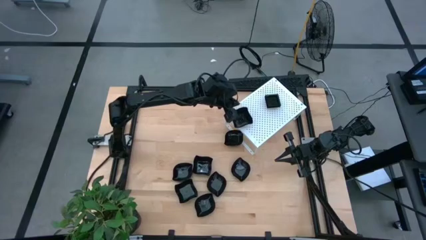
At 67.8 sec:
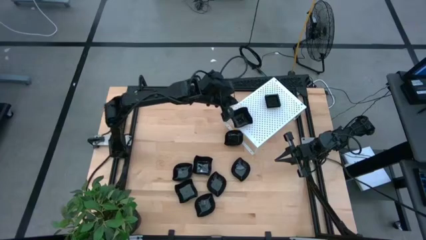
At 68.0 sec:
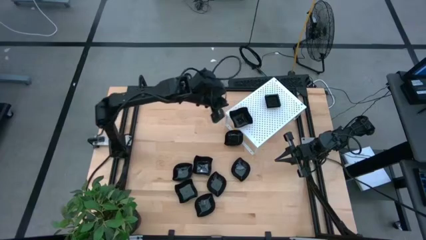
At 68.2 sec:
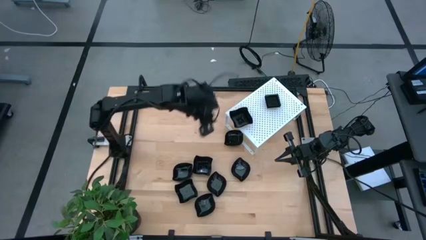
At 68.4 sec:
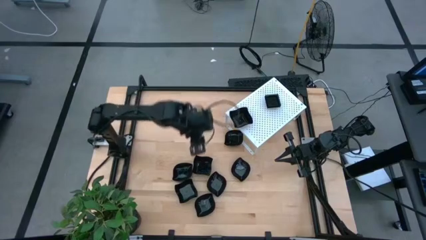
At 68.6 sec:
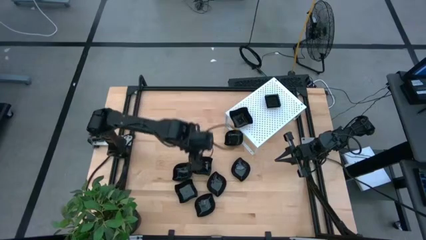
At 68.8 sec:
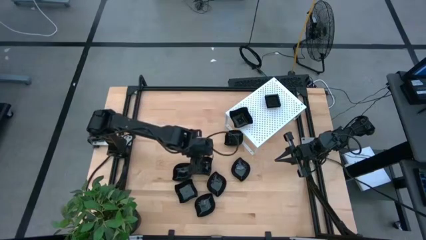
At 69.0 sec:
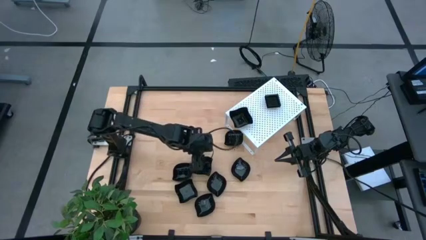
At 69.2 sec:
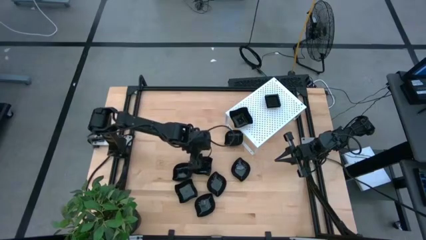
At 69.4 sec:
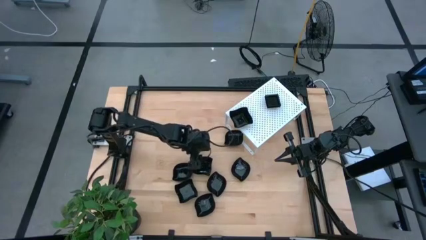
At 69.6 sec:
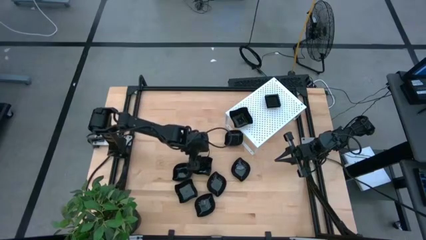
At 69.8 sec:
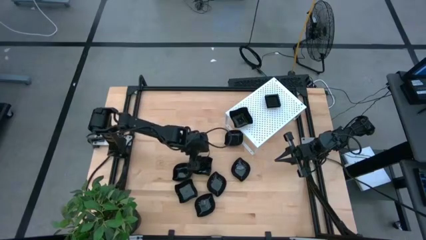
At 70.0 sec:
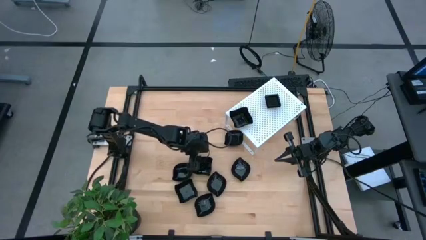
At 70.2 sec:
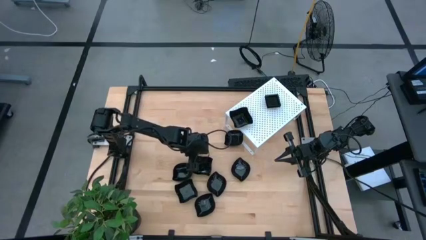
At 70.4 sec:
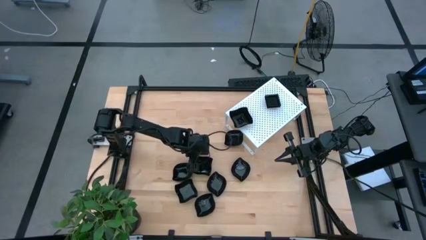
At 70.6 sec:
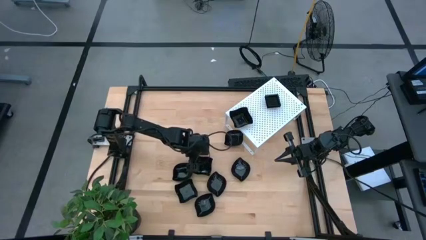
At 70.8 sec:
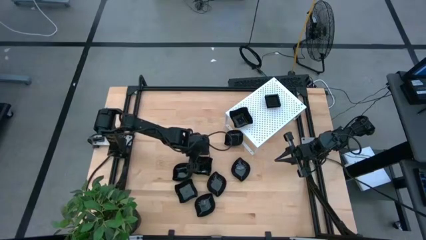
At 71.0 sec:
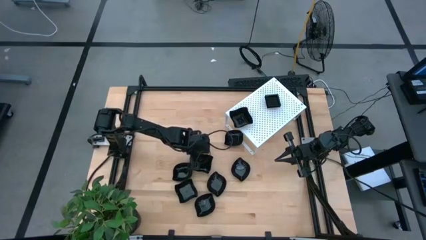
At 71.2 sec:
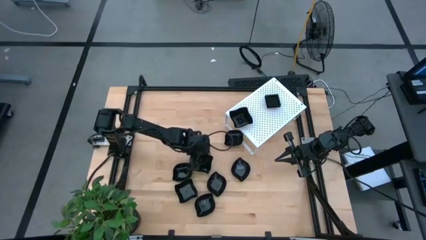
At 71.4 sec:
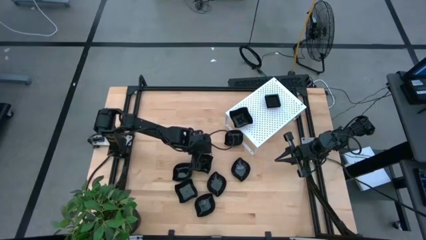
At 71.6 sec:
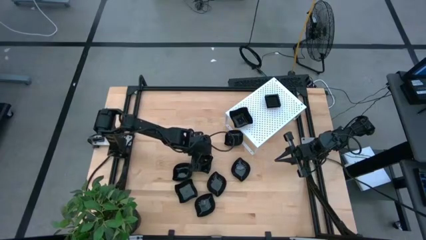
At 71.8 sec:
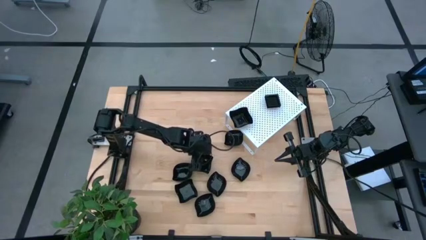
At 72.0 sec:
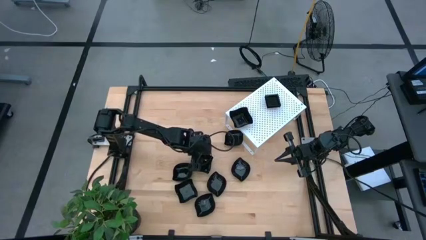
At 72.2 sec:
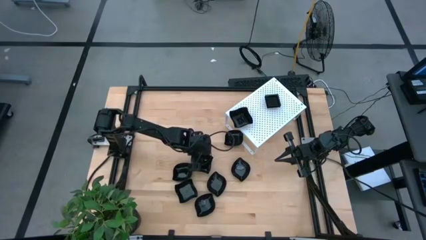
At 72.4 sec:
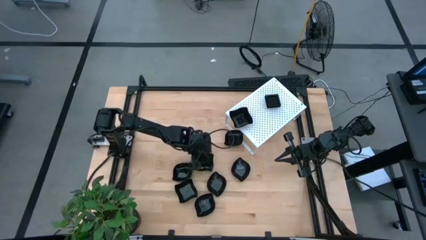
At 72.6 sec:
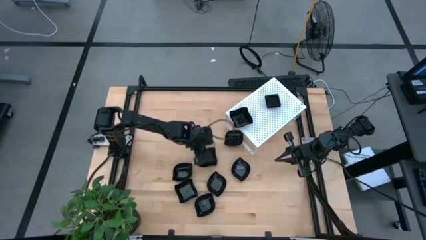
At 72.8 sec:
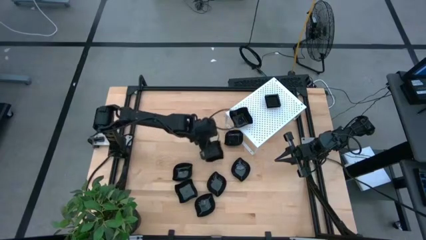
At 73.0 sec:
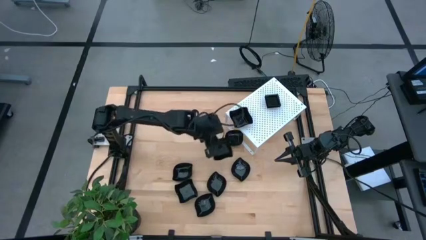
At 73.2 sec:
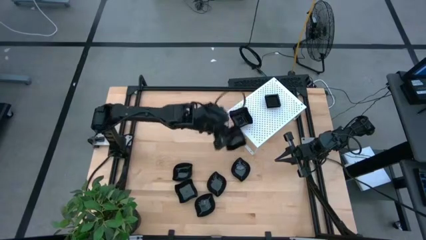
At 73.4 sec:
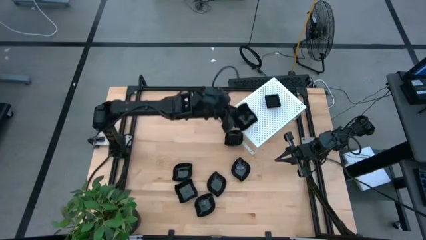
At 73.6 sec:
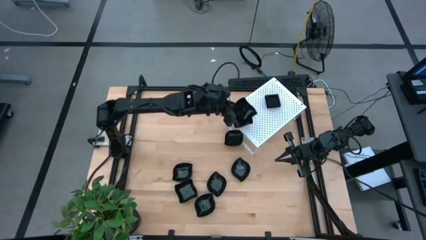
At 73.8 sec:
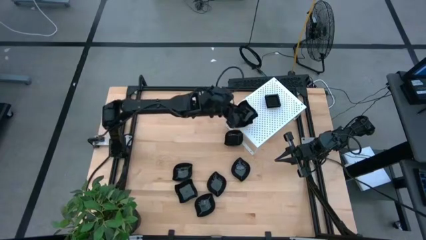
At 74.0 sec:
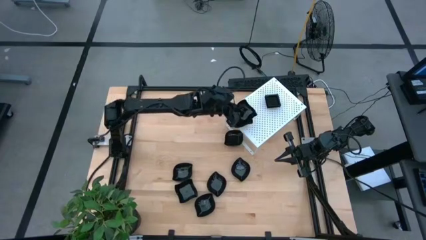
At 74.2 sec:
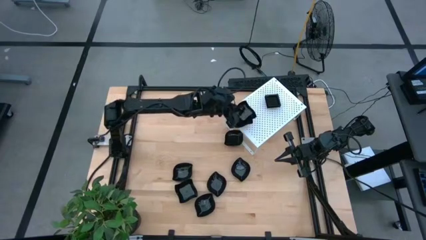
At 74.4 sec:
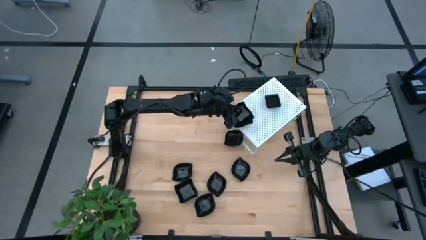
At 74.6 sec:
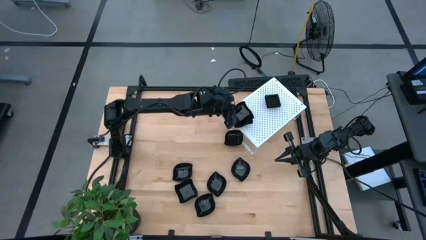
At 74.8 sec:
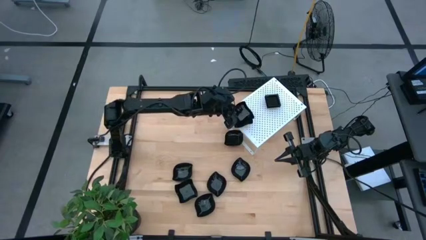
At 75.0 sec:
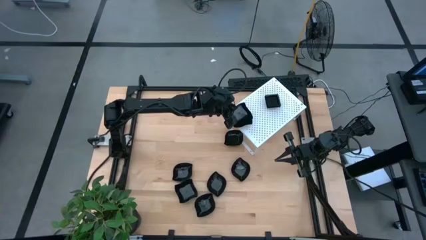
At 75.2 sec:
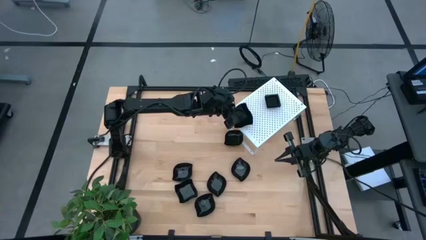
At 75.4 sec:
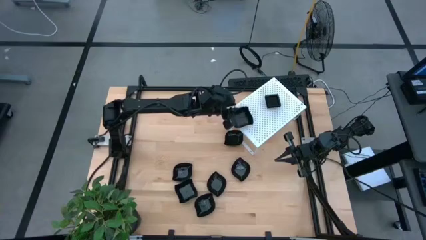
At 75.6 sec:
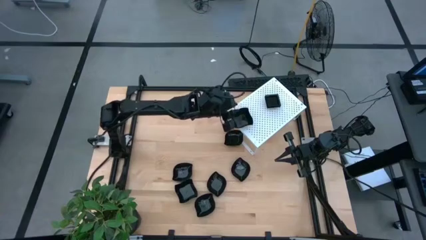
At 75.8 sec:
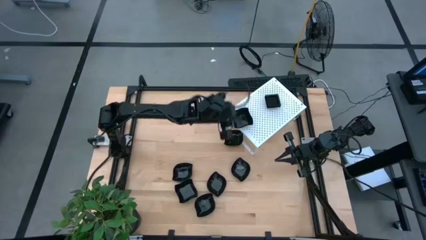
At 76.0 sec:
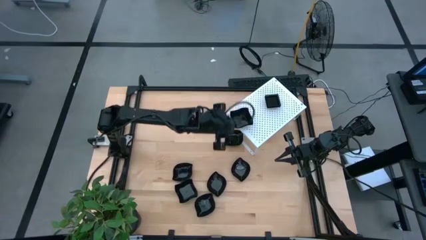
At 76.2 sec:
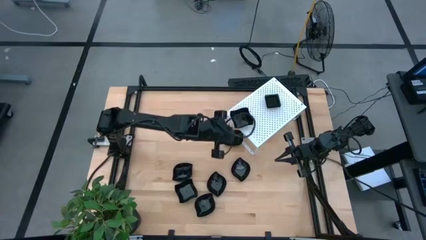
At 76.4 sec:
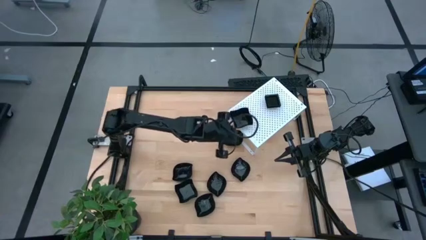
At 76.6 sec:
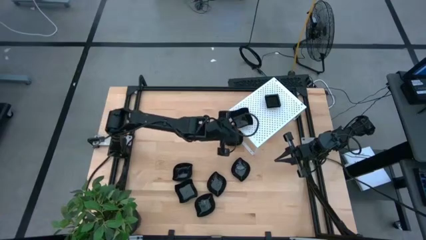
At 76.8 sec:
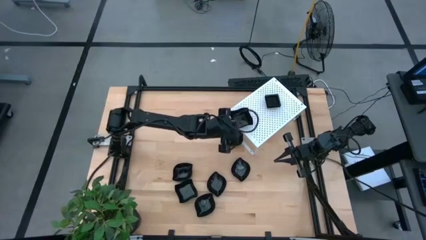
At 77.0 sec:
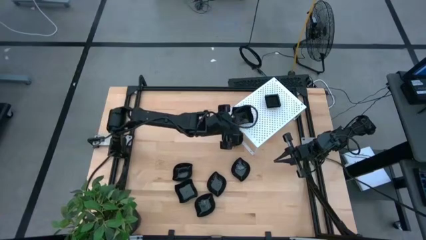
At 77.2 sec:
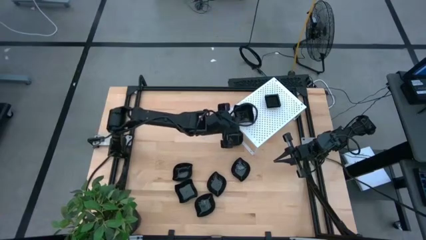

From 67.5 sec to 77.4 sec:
Task: Pick & Place Mini shaped plates
Stack the black distorted square plate on top of the black distorted square plates on the shelf

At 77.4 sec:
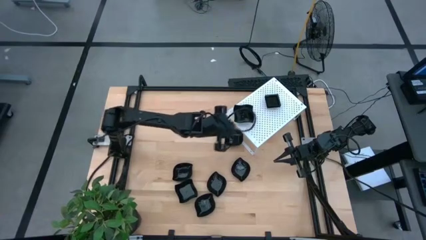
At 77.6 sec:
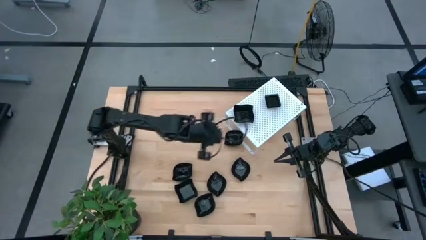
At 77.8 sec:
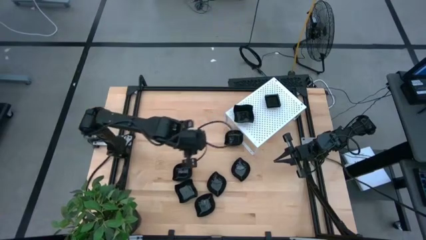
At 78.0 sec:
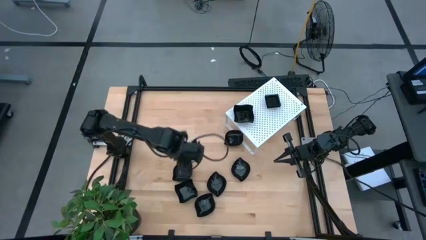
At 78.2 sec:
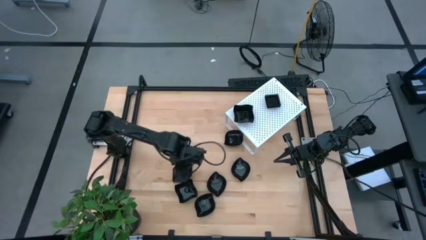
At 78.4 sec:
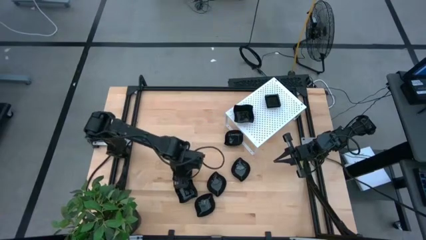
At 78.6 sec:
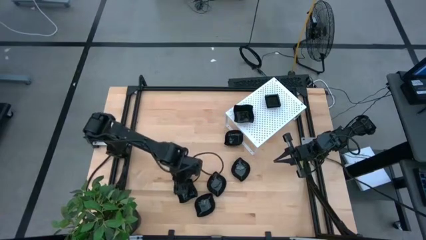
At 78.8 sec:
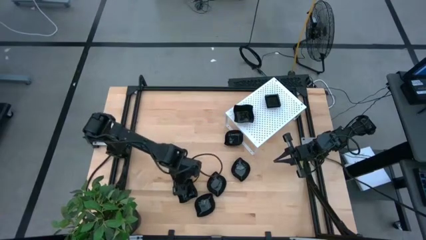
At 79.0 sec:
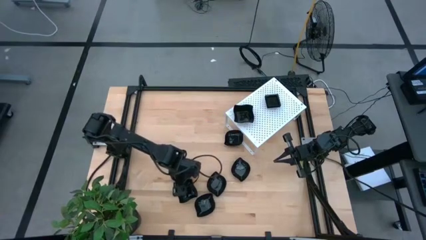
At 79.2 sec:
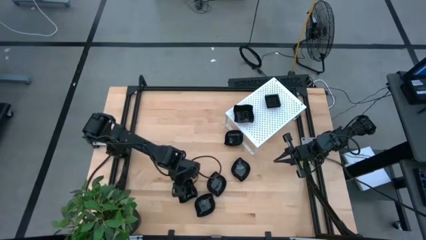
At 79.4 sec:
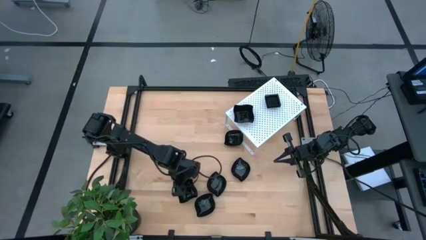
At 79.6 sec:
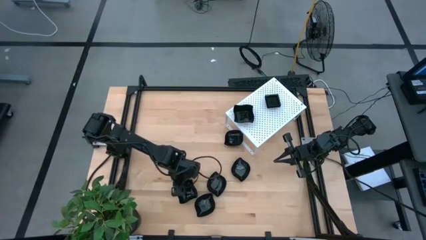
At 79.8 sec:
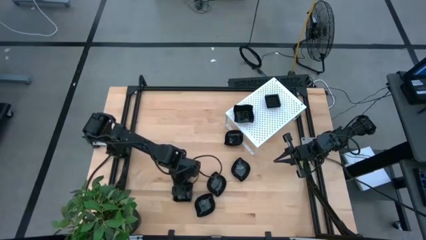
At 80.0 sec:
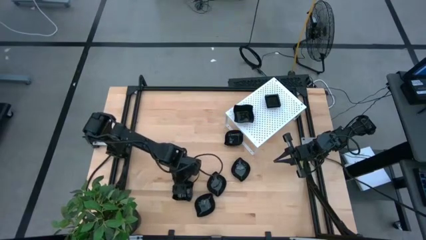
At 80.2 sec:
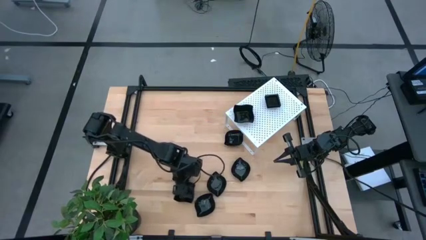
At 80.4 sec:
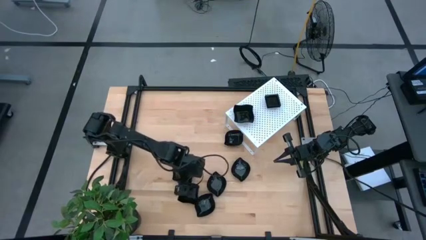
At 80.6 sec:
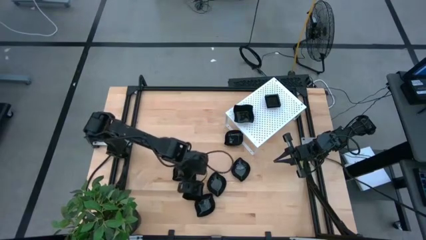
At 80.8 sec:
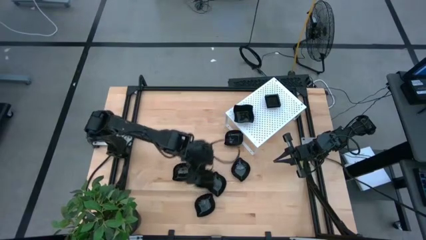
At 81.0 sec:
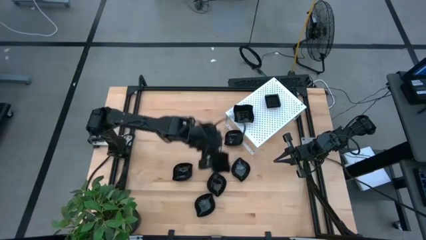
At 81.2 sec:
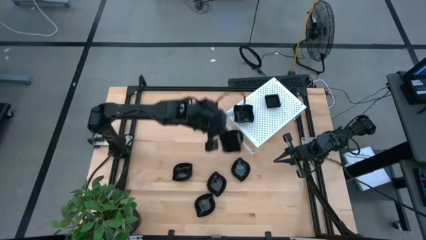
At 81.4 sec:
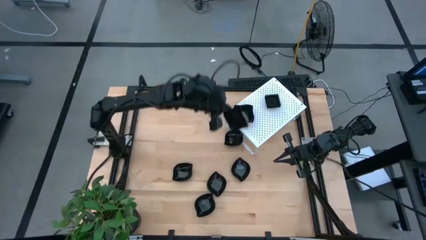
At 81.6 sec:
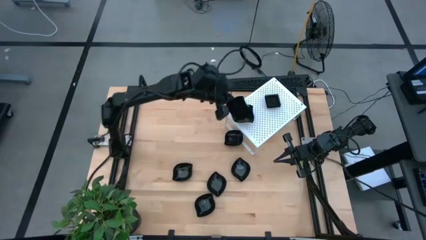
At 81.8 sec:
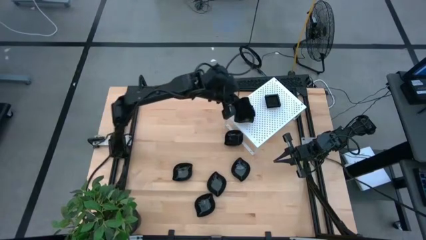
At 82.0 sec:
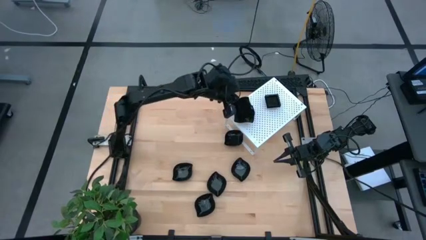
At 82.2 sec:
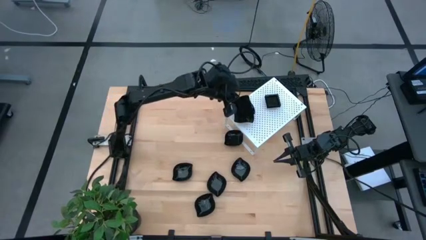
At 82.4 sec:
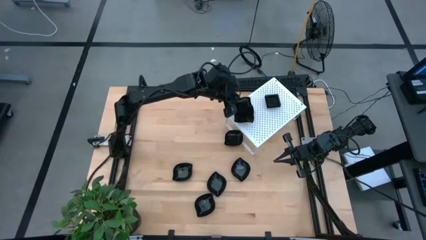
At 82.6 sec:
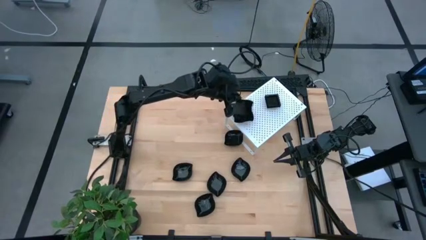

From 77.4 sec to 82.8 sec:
Stack the black distorted square plate on top of the black distorted square plates on the shelf

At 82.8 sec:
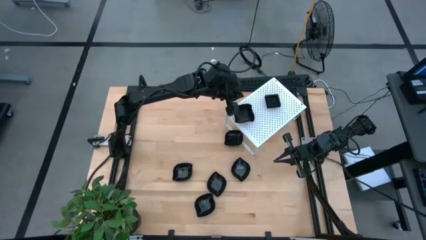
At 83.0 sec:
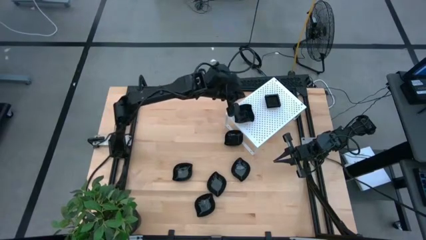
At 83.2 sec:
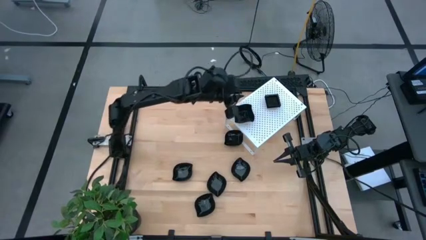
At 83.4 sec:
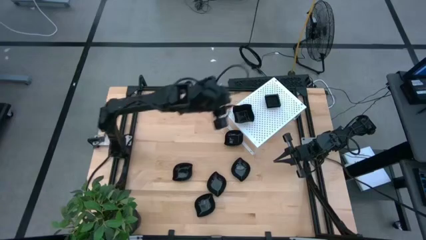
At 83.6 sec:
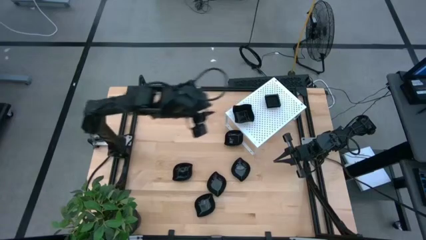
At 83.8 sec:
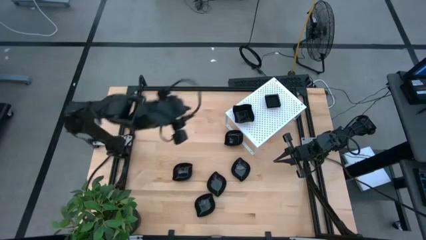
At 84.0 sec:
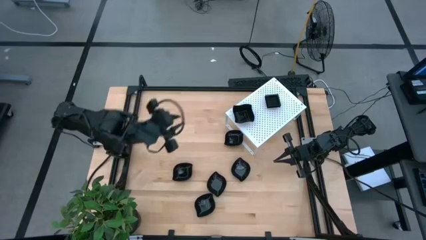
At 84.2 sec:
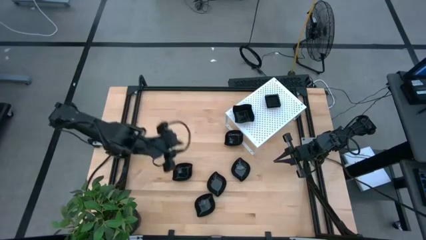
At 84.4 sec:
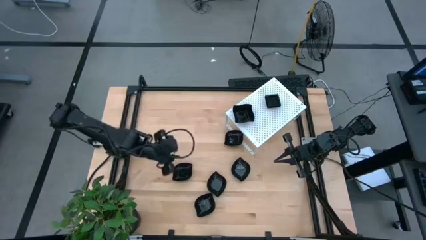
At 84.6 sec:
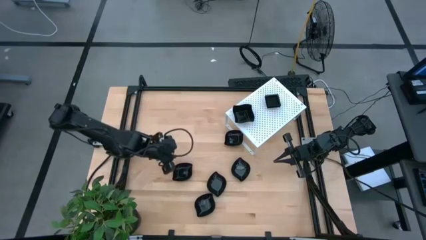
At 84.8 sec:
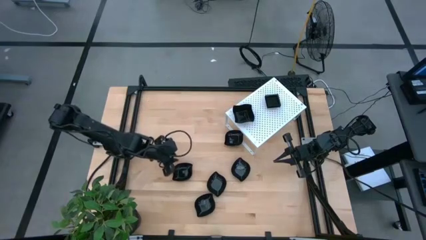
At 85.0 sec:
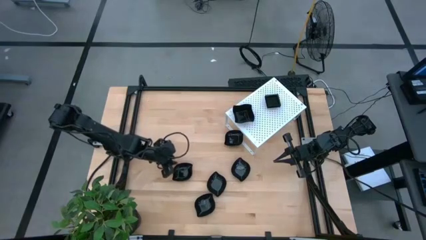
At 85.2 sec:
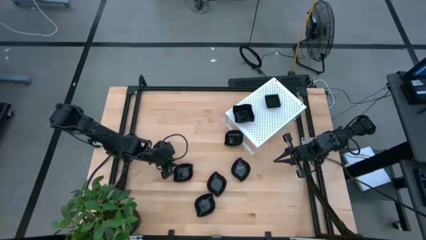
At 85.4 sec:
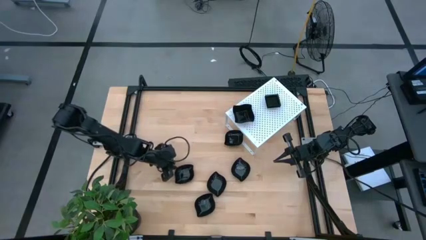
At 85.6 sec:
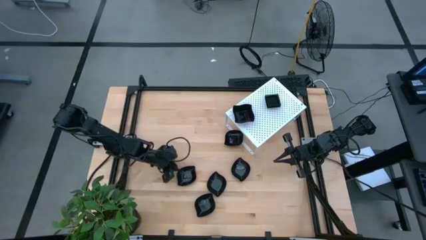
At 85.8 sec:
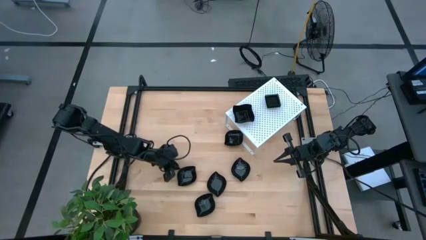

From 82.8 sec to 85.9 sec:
Put the black leaf shaped plate on the shelf
